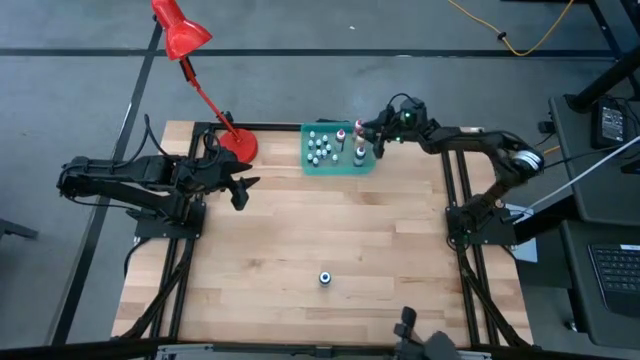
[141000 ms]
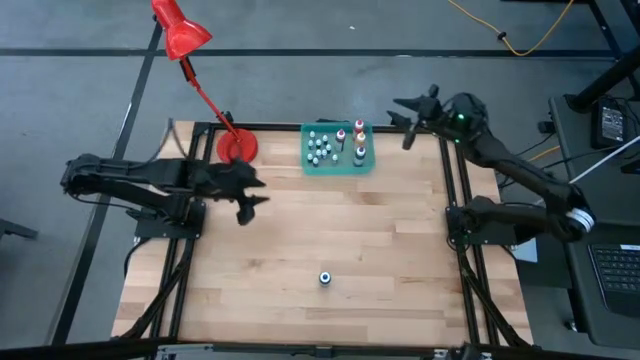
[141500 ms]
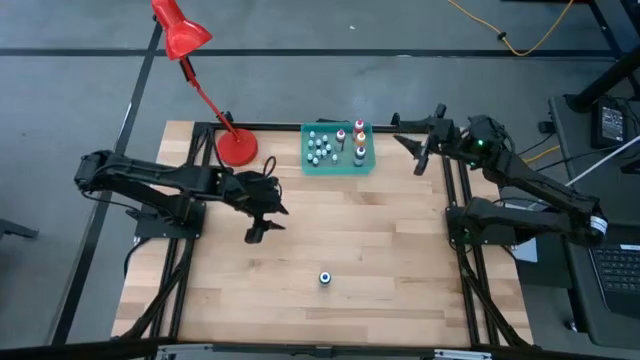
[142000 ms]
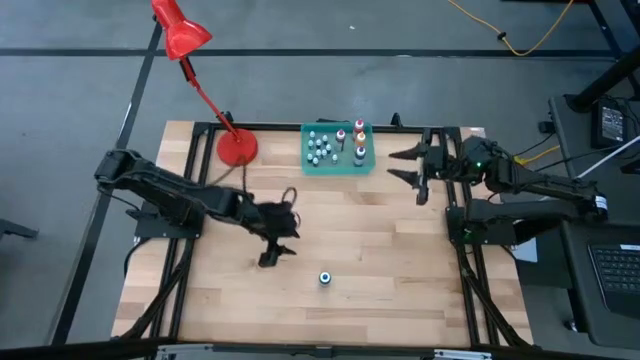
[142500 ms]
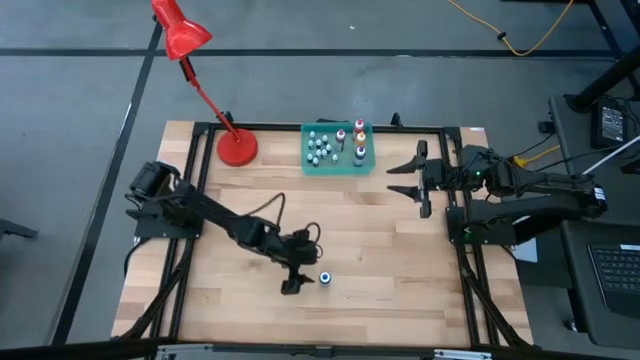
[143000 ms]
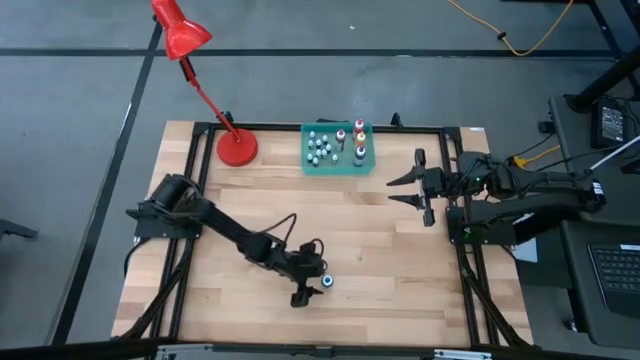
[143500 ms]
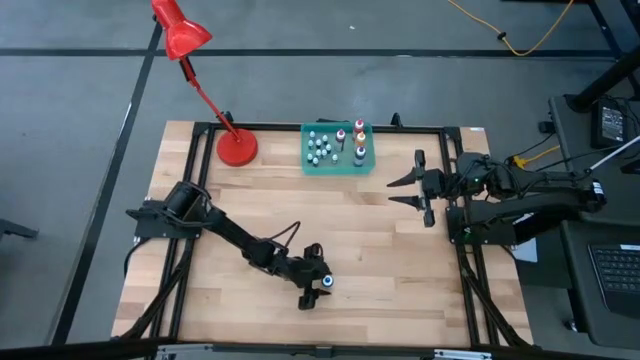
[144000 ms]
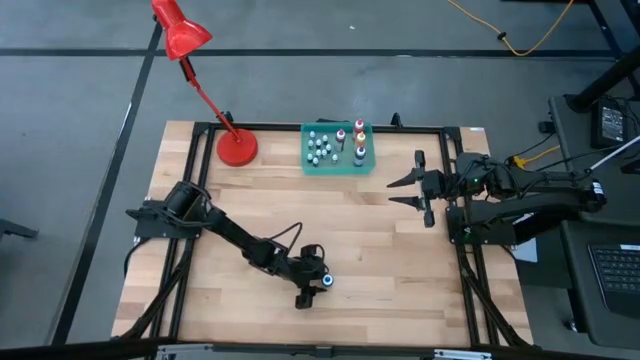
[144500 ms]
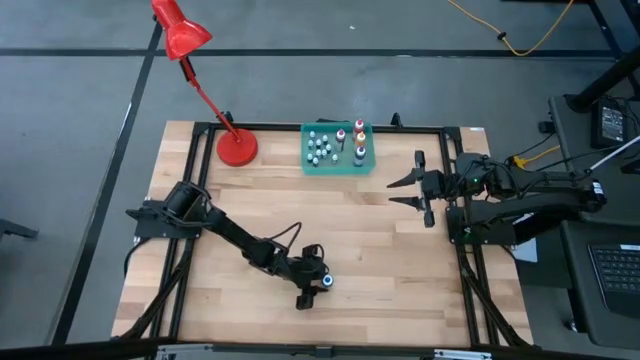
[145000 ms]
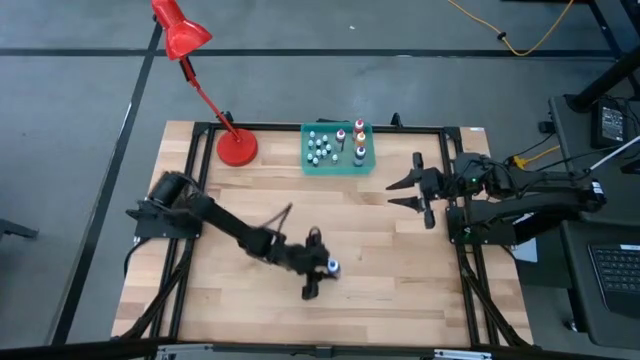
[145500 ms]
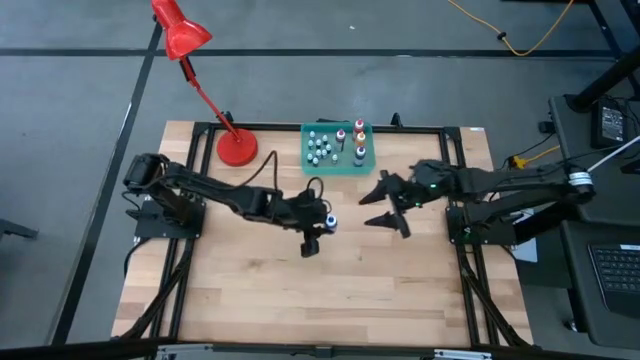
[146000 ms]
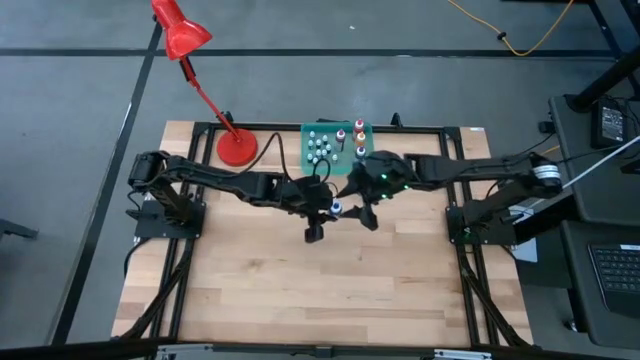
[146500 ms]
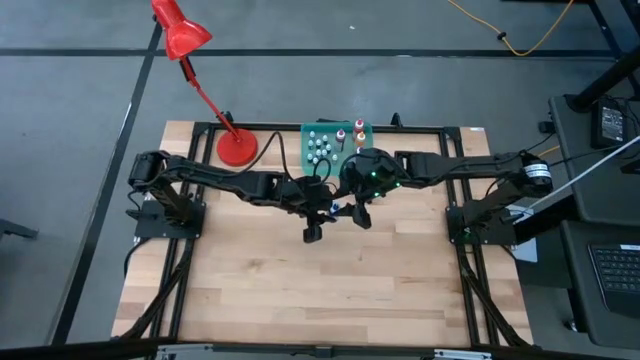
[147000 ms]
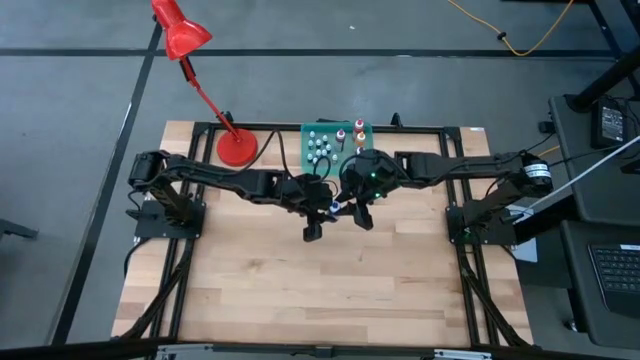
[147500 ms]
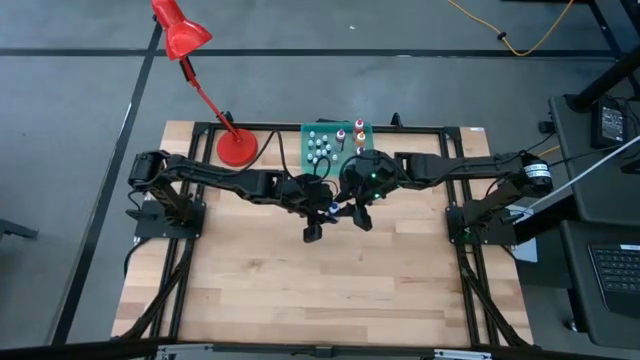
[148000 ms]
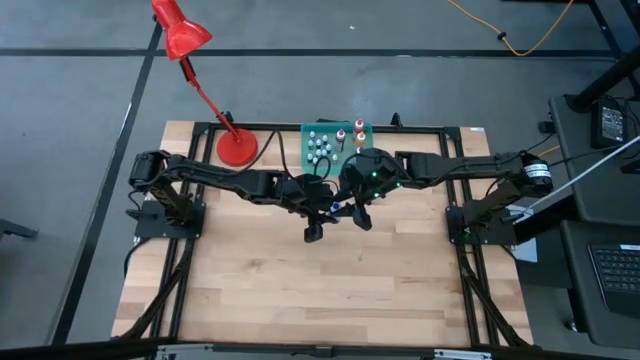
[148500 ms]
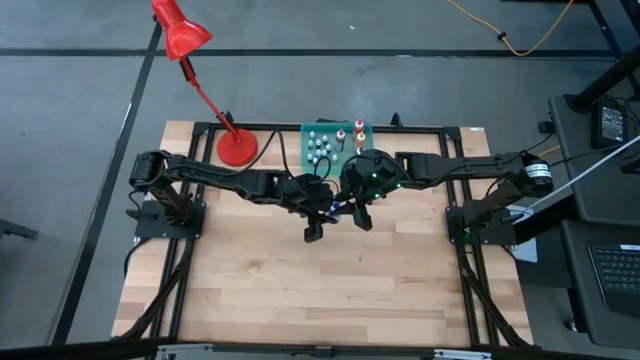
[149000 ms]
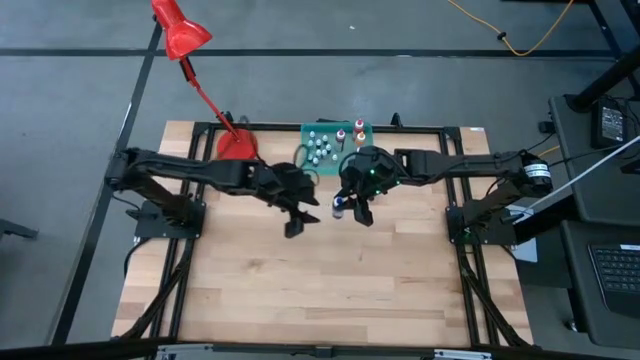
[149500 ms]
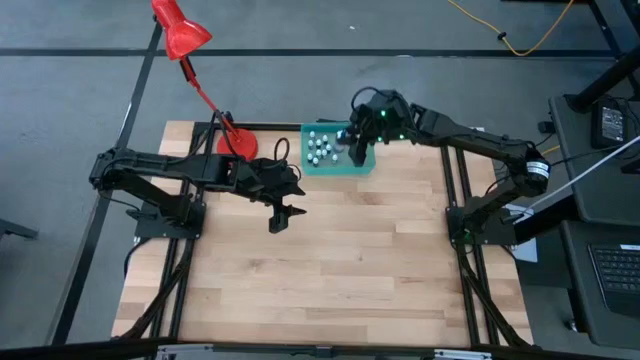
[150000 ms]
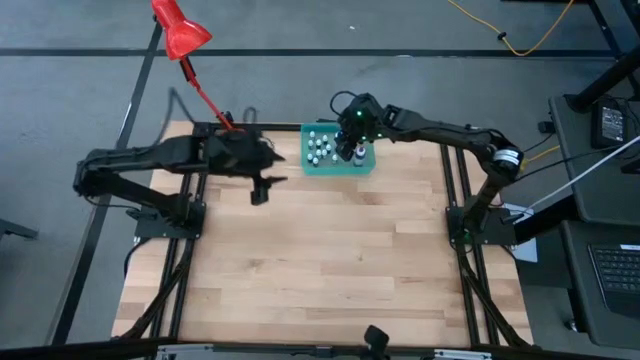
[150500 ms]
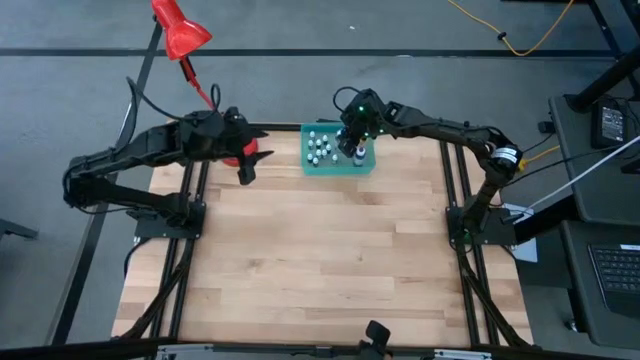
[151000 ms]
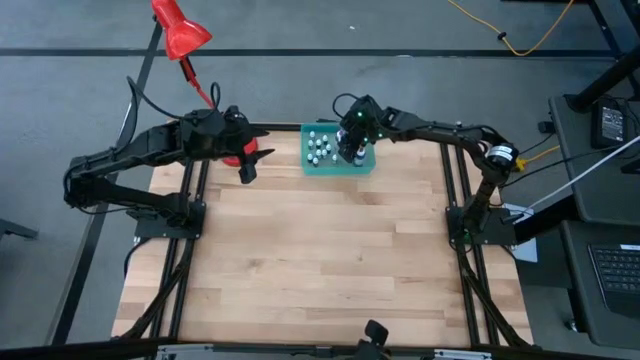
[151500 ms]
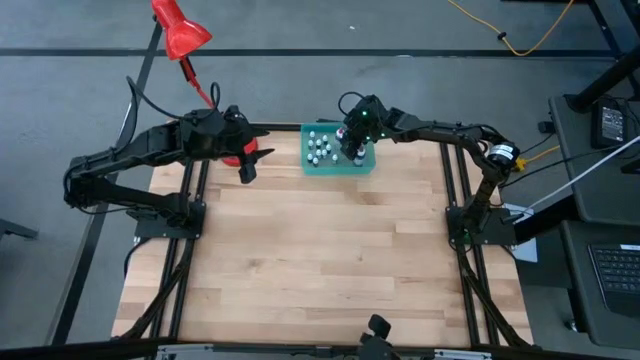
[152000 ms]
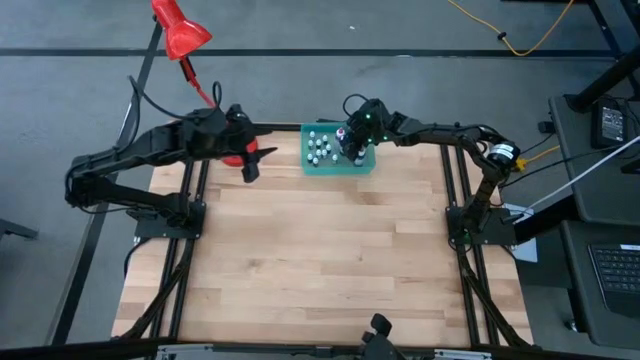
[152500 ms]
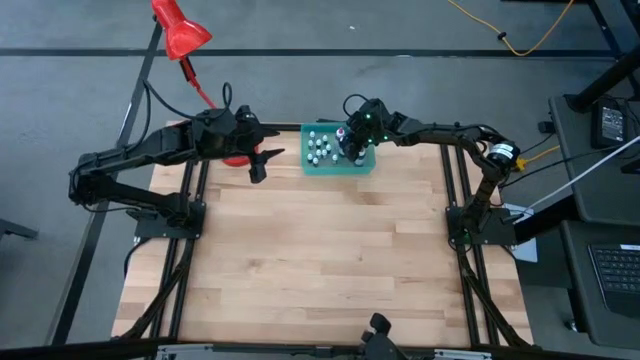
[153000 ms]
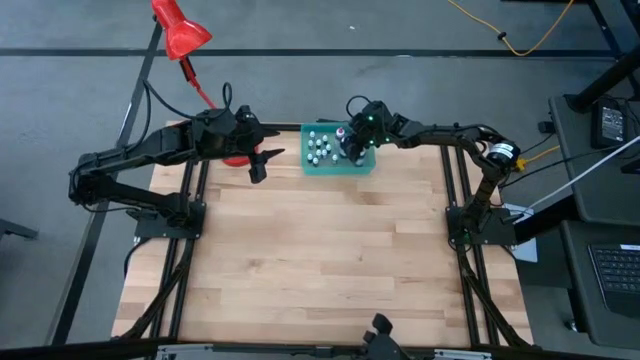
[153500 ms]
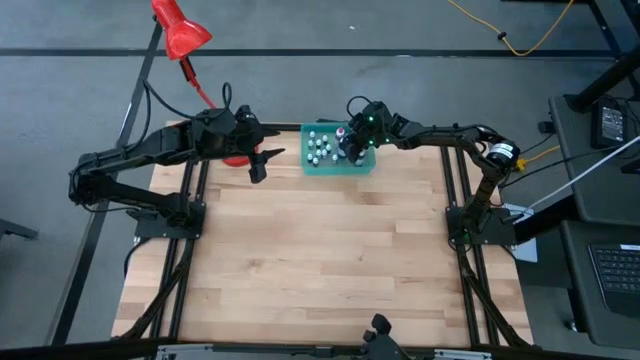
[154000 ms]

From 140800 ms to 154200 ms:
Task: Pick & Place food coloring
Put the large blue food coloring bottle into the green bin

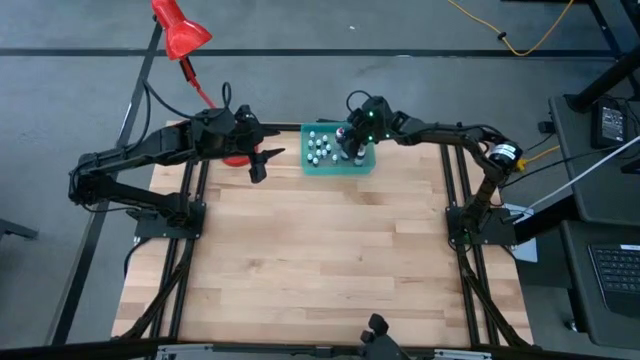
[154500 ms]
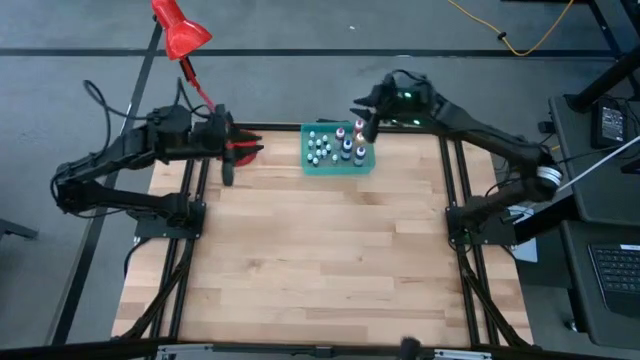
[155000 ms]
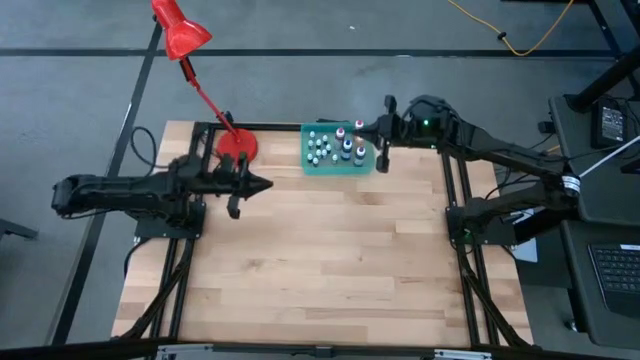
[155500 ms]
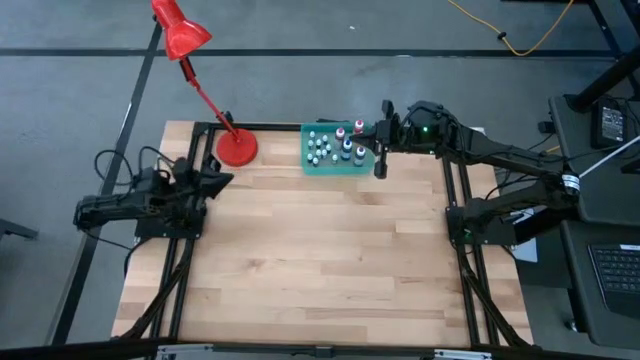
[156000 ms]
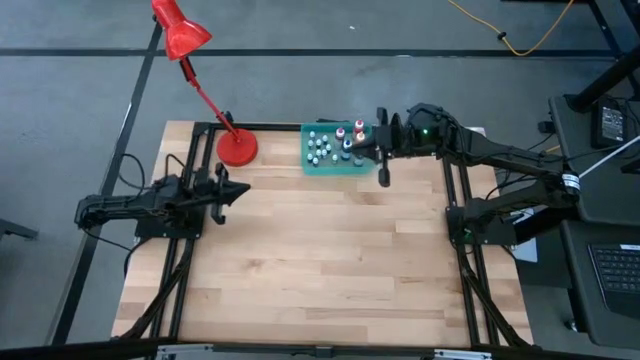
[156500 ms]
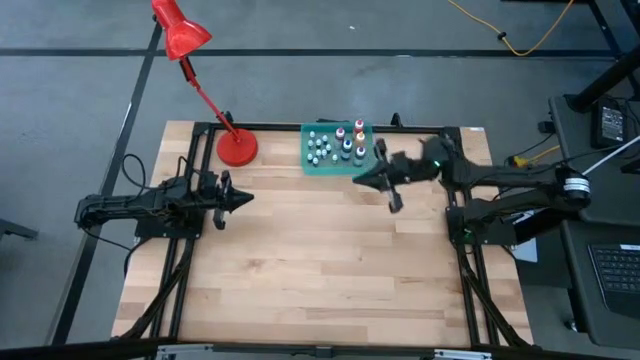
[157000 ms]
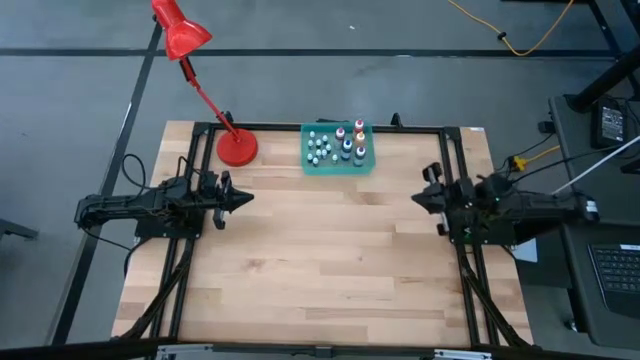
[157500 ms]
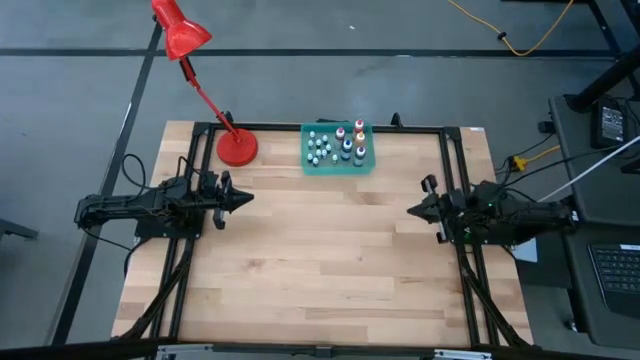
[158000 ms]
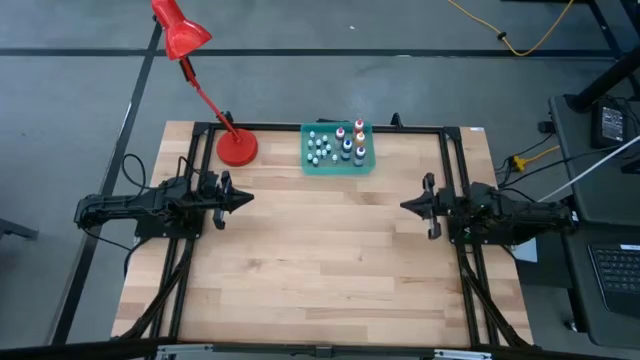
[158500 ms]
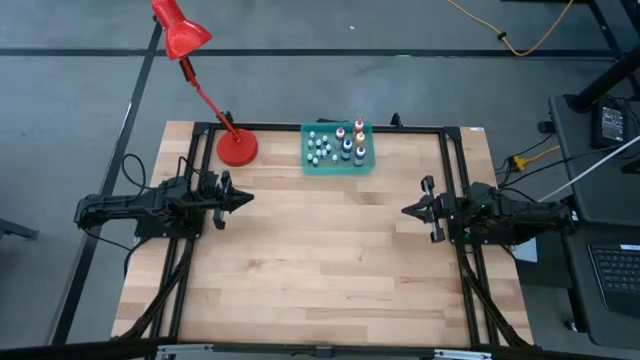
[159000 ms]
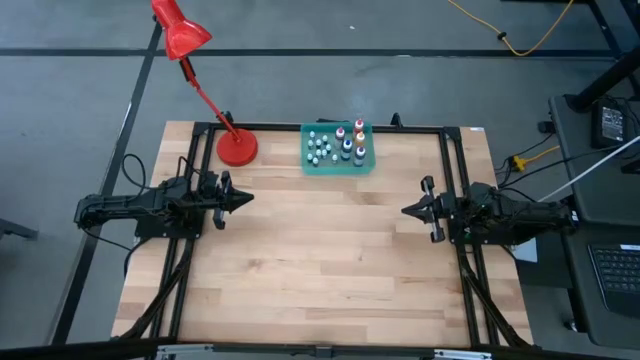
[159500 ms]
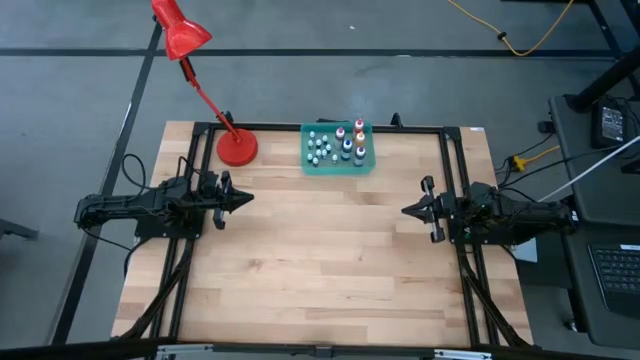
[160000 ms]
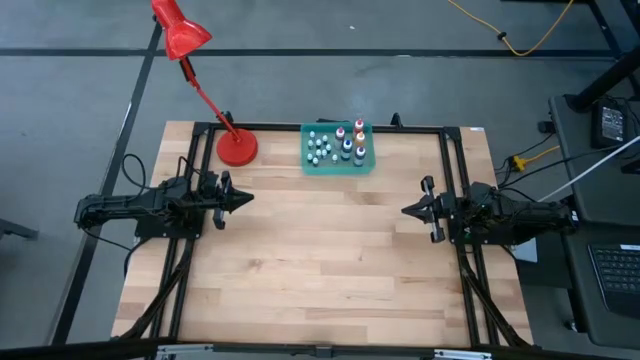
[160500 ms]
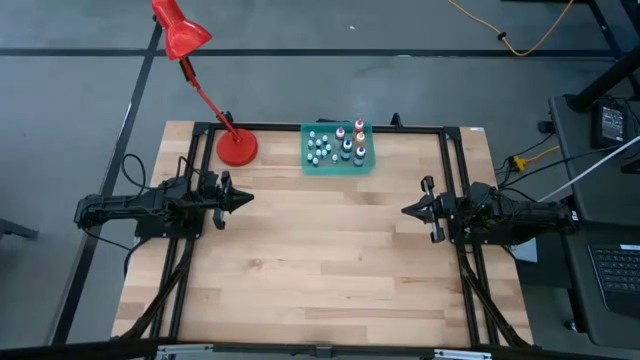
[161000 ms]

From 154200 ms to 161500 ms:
Return to Home Position

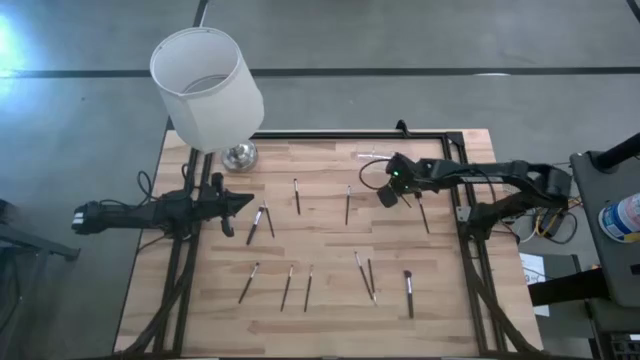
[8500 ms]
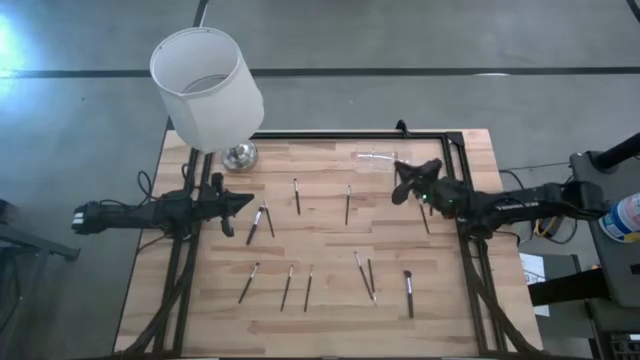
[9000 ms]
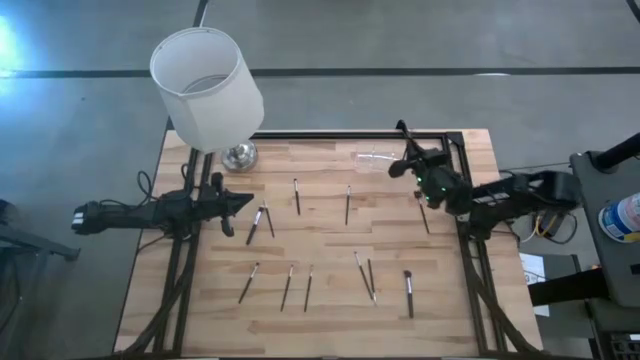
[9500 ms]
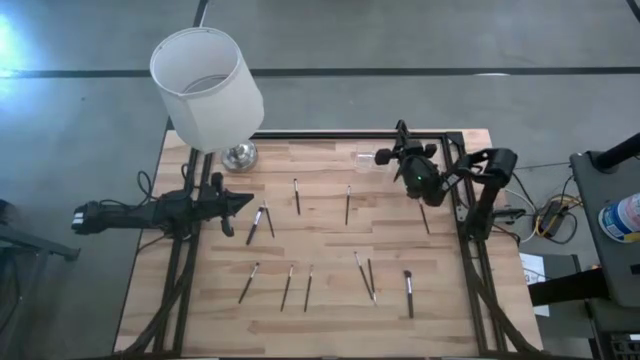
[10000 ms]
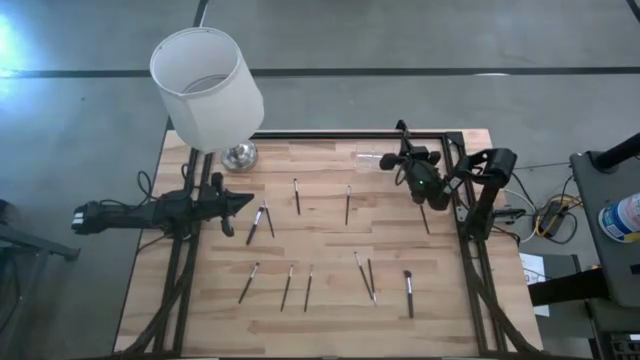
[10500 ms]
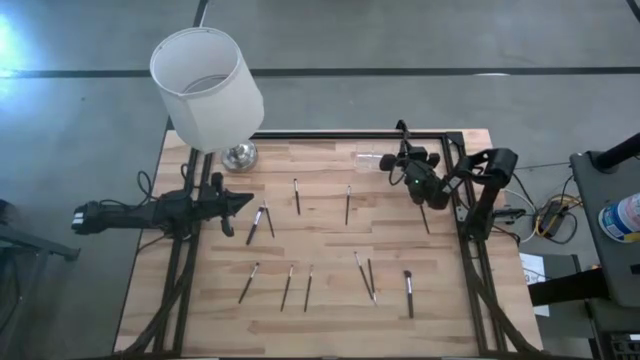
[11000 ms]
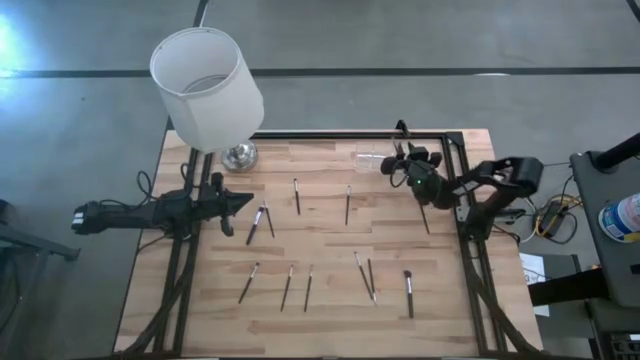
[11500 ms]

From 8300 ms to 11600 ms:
Task: Put items in baskets/containers
Put the foundation brush in the left compartment of the transparent organizer
